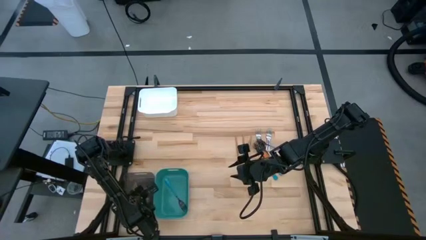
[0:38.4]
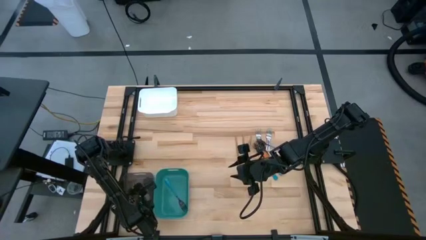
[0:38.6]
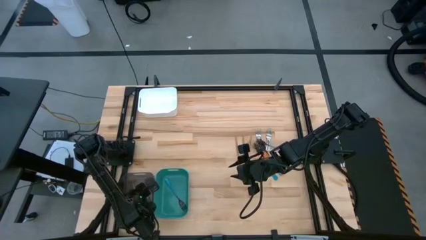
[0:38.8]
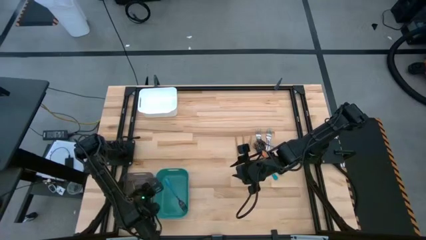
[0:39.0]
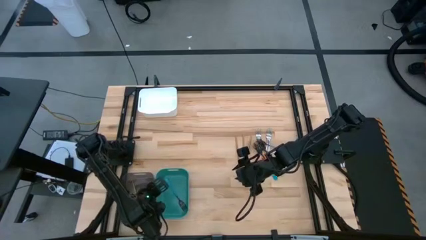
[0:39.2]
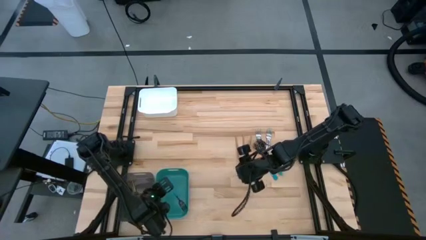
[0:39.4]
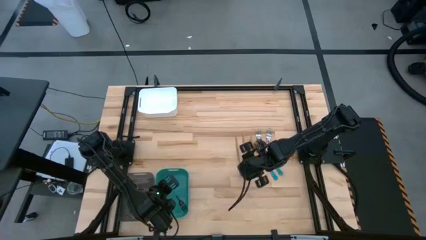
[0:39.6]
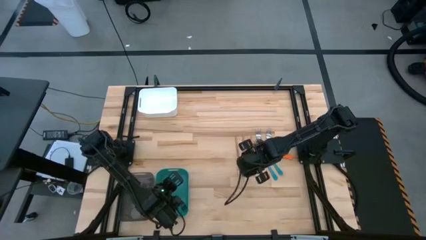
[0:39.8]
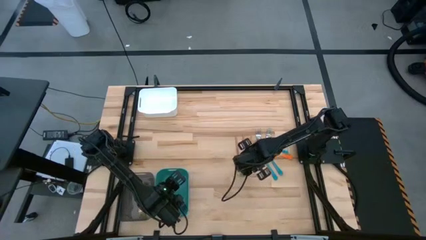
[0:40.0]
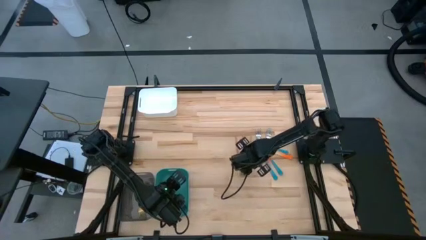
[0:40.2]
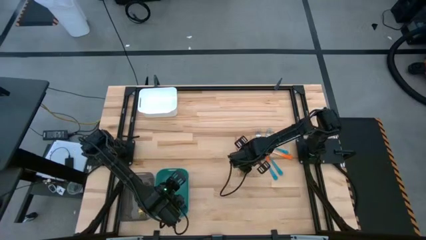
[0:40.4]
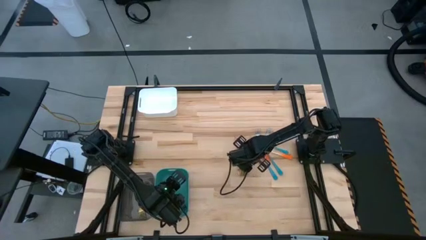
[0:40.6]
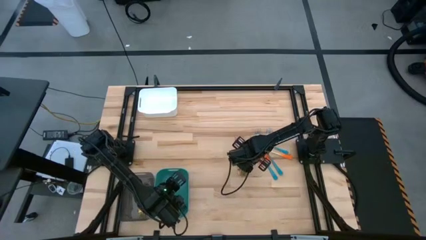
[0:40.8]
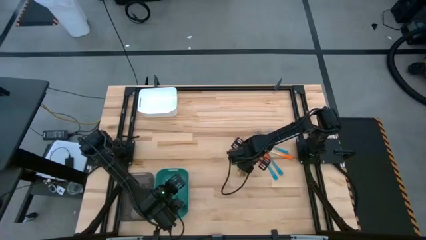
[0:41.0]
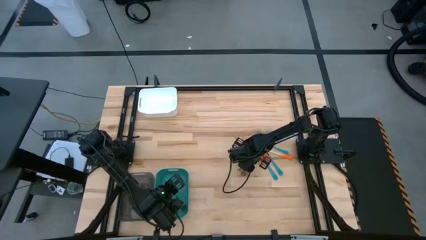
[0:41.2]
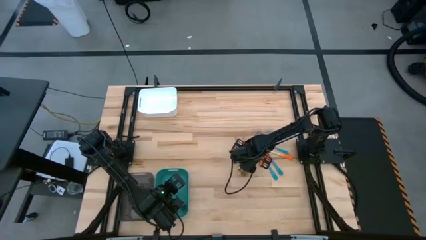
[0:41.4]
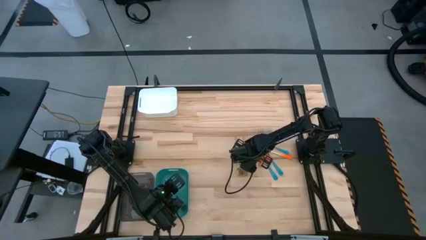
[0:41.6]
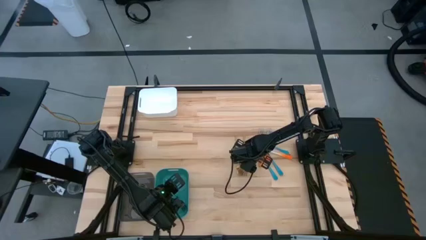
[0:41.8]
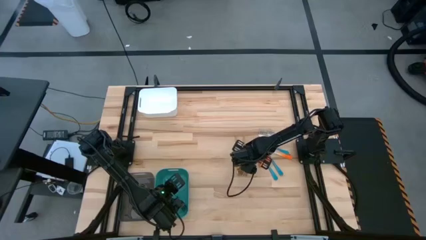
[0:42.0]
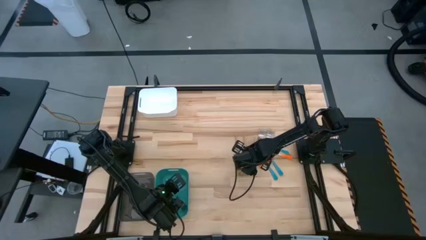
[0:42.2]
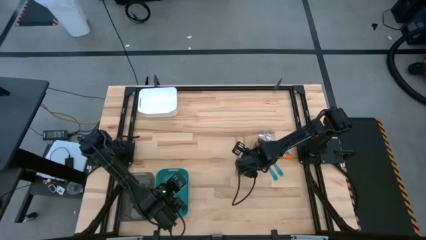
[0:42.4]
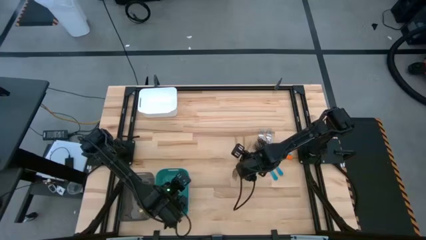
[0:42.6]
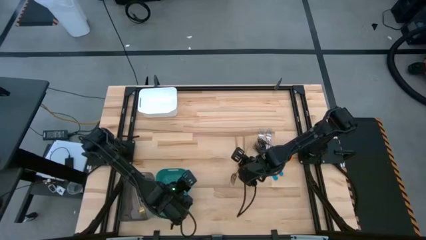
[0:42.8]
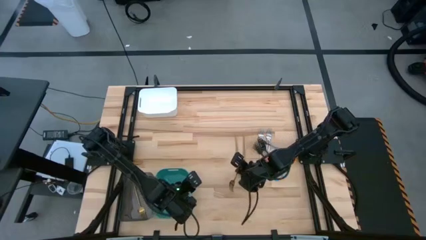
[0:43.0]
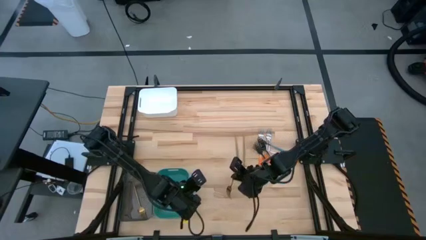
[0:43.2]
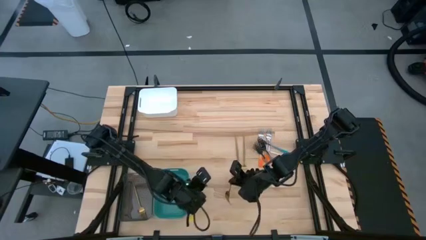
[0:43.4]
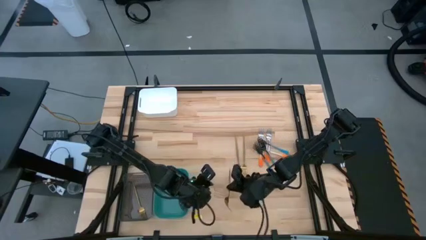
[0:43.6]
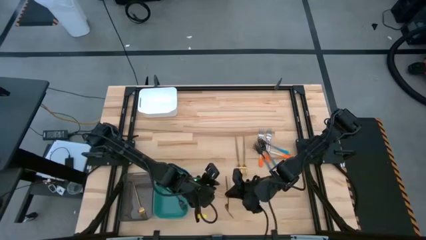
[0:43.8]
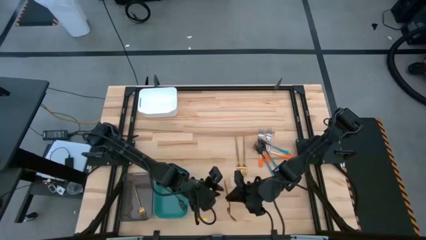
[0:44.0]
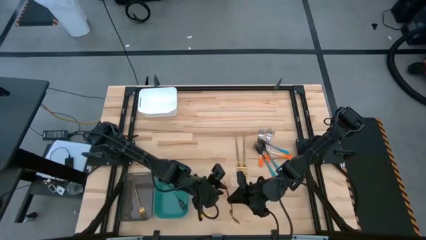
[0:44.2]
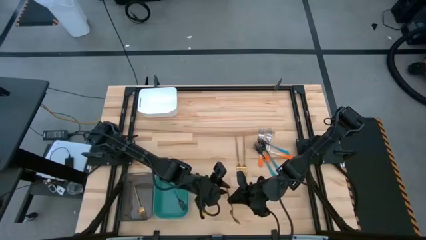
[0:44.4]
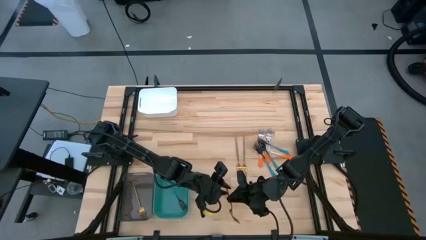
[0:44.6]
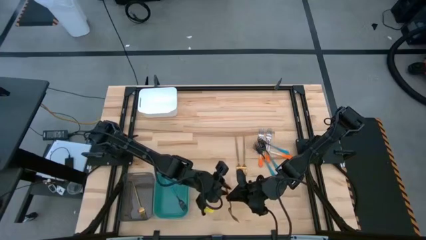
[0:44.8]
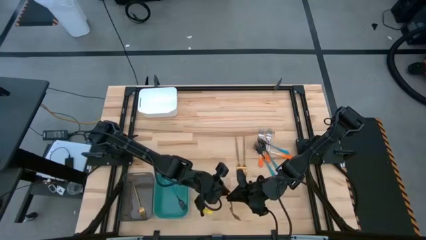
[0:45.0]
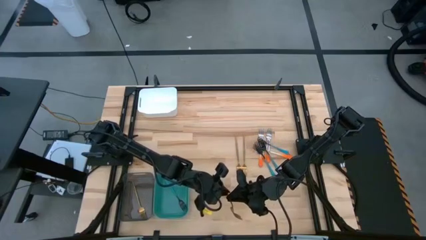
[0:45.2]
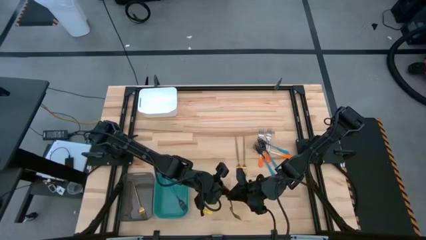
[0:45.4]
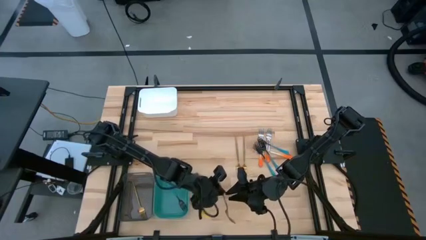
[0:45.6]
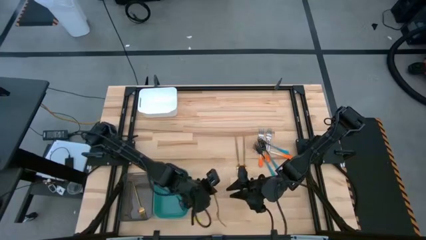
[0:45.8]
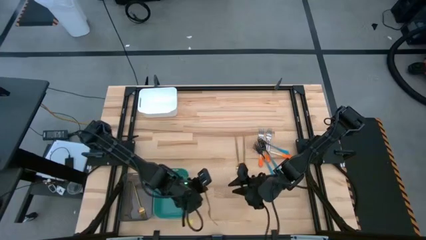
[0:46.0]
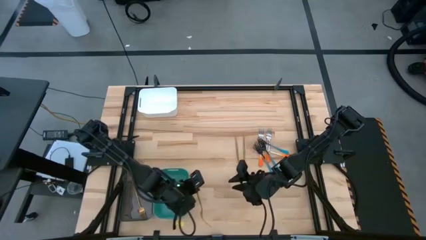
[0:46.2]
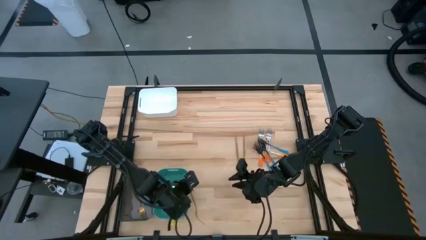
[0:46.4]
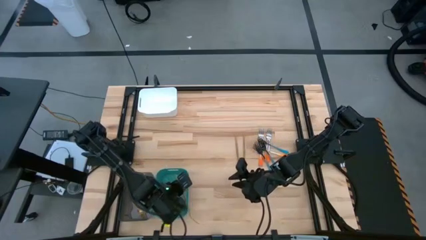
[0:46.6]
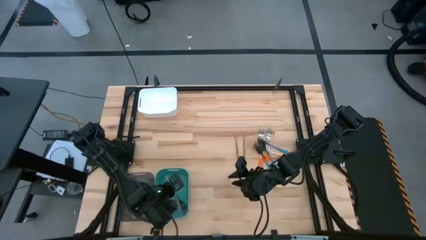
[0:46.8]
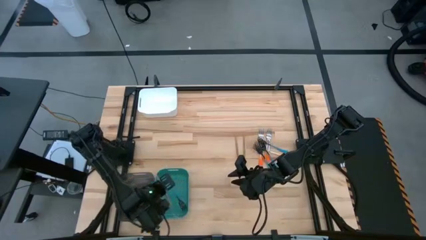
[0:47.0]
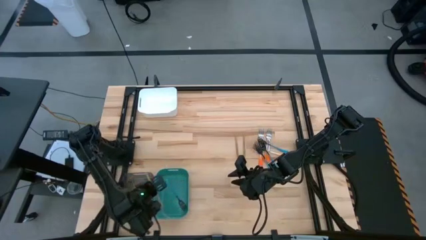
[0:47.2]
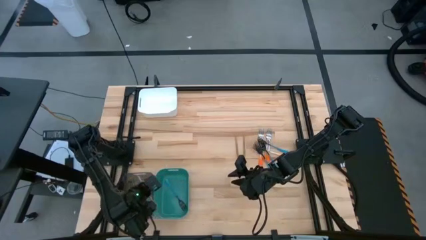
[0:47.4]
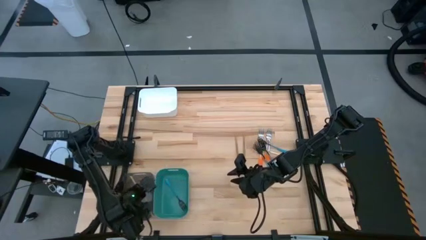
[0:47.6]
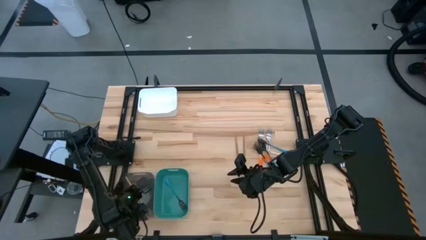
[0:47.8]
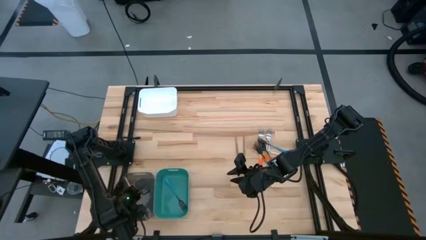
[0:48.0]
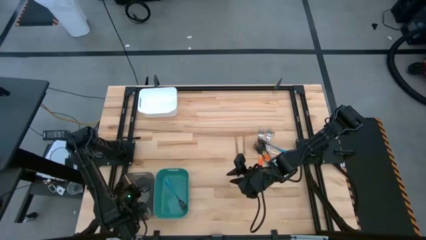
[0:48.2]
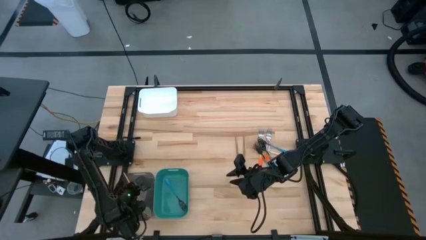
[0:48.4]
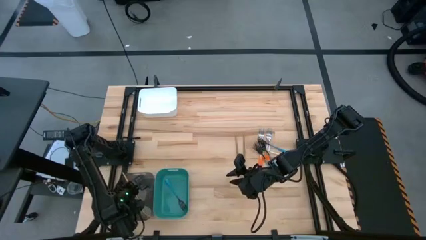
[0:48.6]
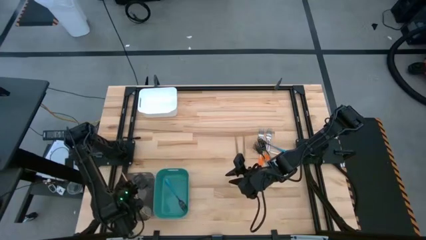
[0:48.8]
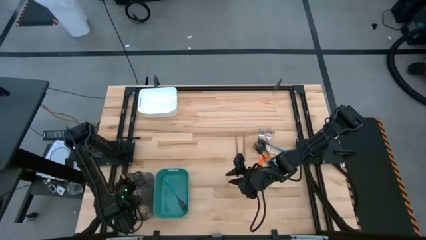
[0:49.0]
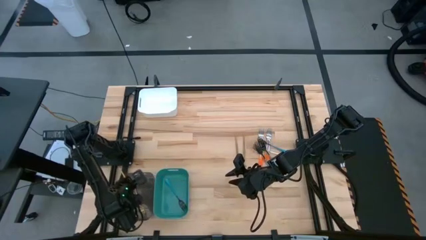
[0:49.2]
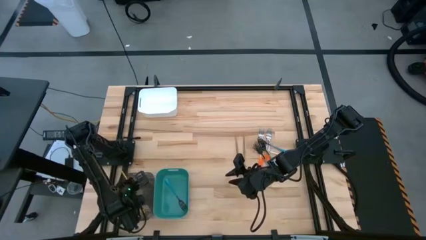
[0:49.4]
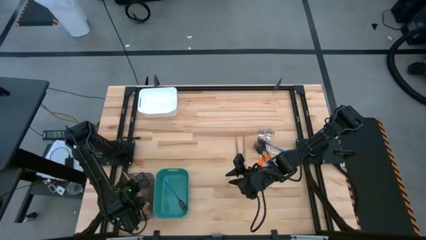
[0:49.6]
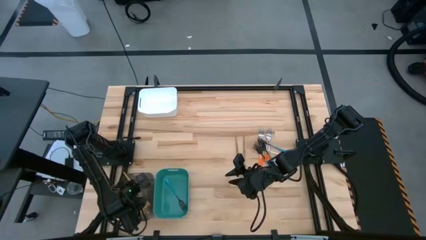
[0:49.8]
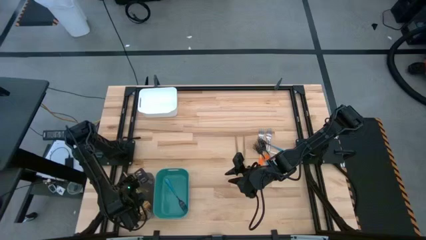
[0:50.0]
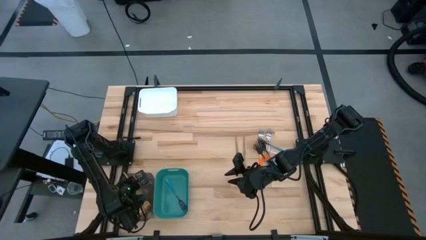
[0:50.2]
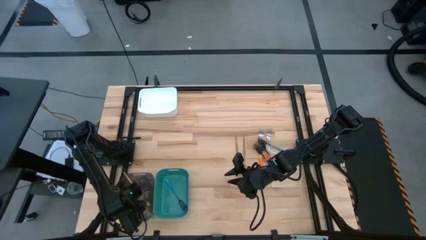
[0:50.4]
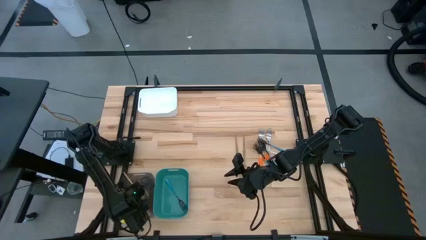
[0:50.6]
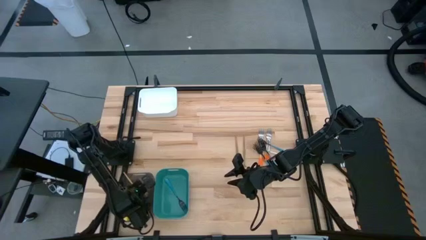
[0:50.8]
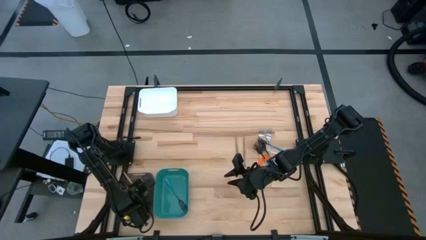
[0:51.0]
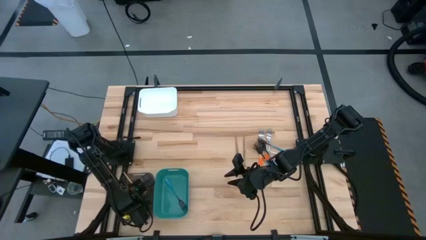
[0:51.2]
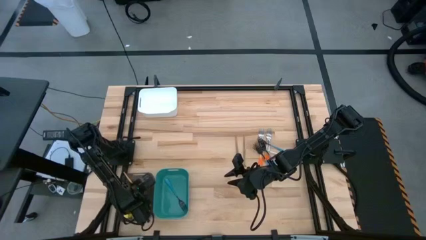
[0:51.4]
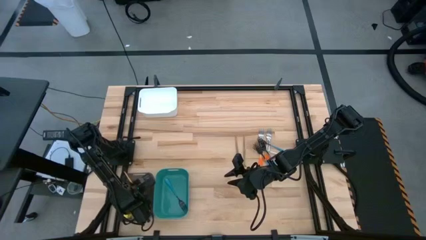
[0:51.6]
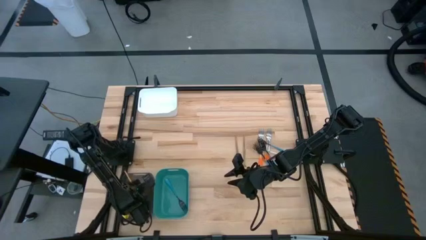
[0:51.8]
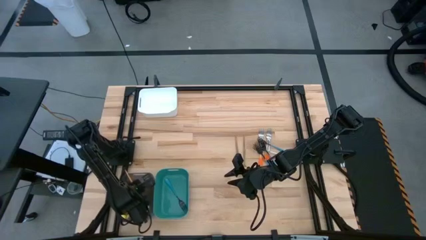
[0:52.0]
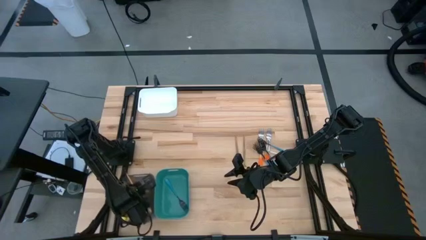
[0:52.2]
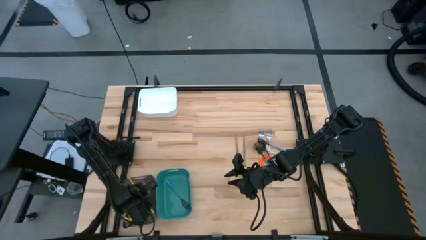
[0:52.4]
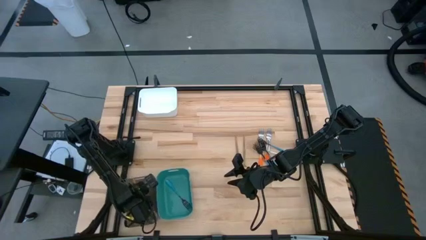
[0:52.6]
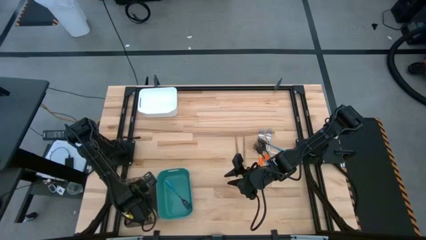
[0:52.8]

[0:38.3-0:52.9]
Task: Sort silverware by color (type)
Put the gold fork into the black bin
